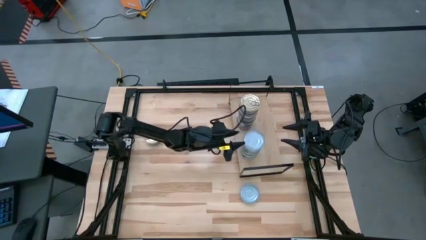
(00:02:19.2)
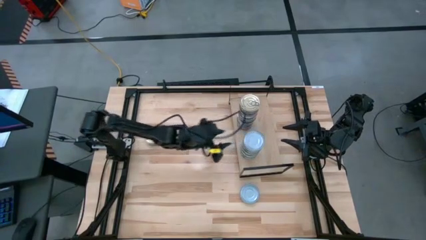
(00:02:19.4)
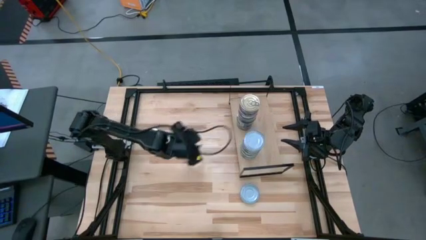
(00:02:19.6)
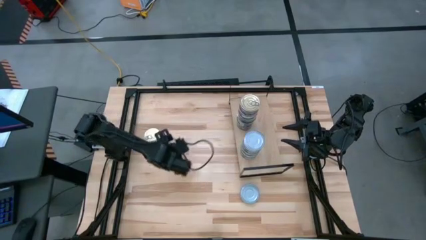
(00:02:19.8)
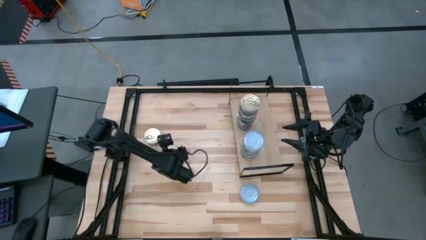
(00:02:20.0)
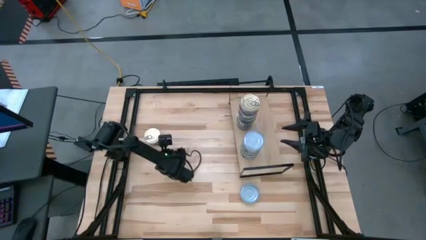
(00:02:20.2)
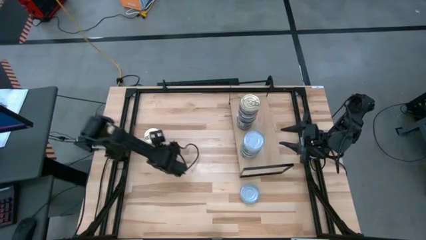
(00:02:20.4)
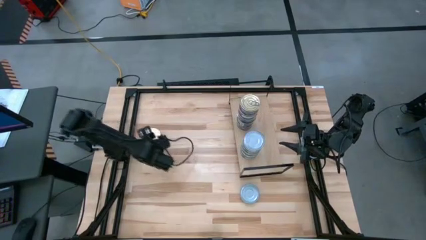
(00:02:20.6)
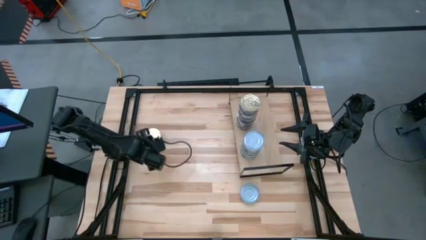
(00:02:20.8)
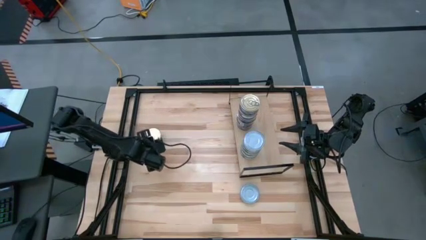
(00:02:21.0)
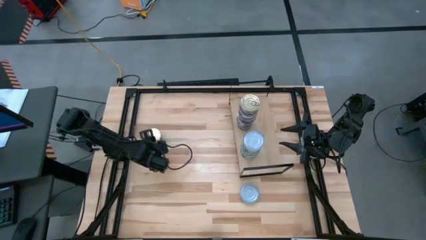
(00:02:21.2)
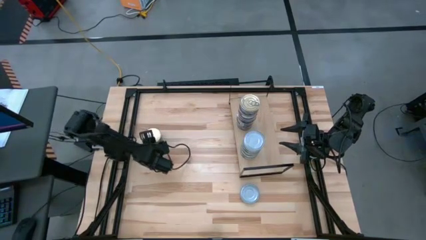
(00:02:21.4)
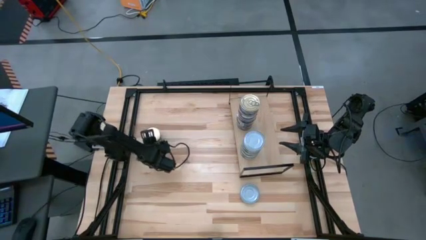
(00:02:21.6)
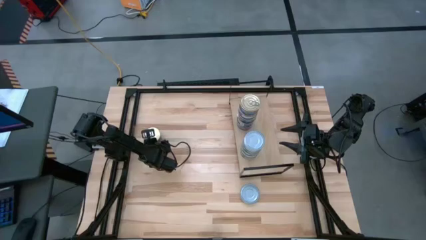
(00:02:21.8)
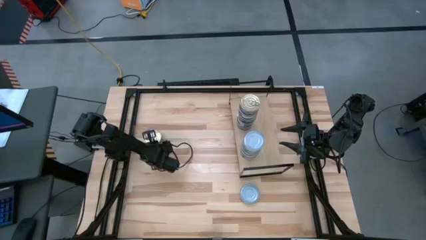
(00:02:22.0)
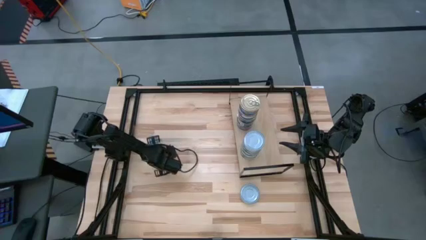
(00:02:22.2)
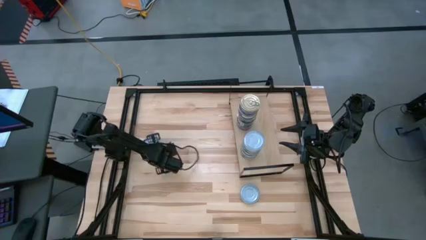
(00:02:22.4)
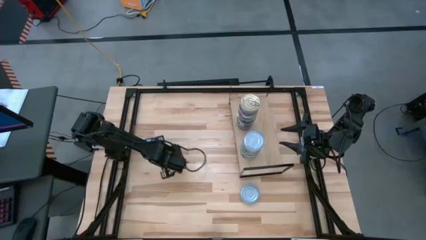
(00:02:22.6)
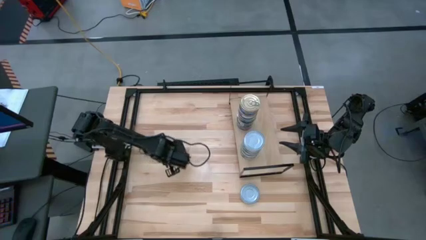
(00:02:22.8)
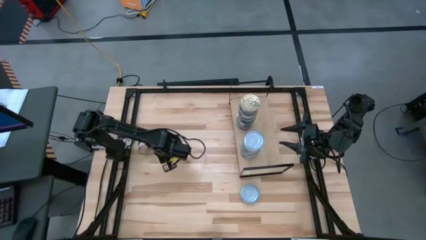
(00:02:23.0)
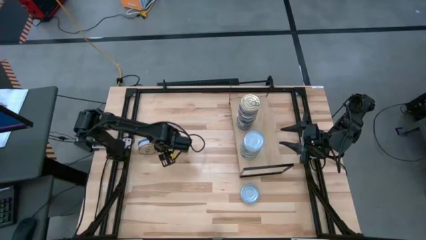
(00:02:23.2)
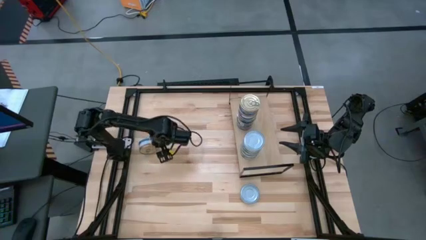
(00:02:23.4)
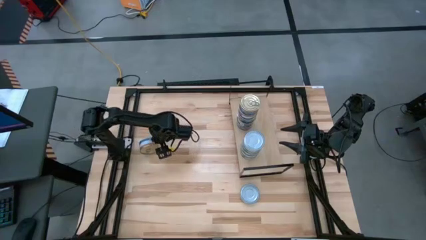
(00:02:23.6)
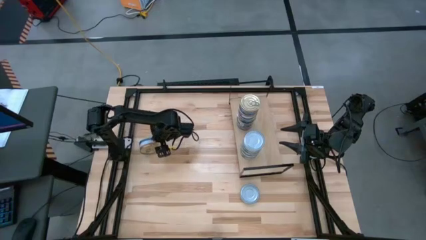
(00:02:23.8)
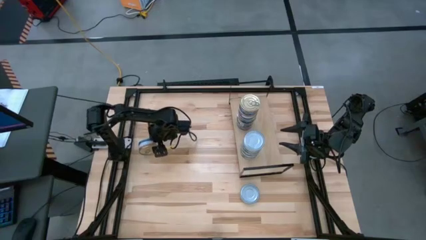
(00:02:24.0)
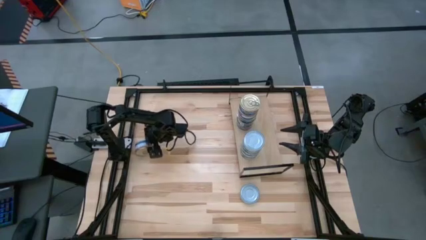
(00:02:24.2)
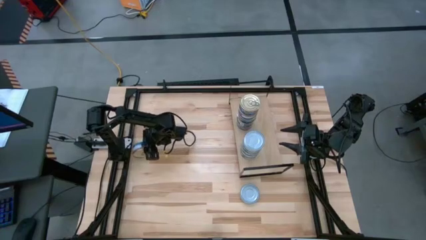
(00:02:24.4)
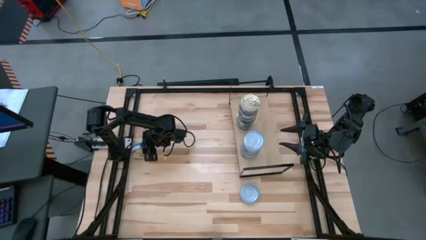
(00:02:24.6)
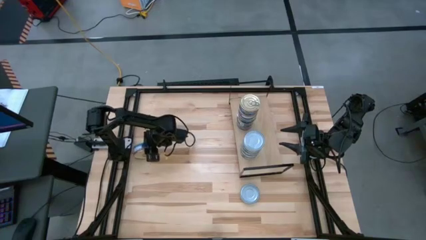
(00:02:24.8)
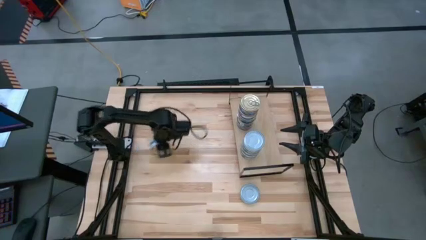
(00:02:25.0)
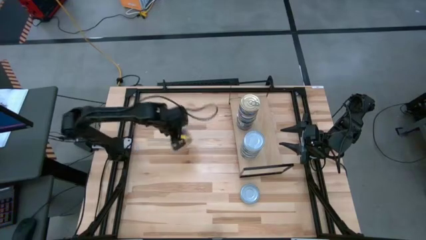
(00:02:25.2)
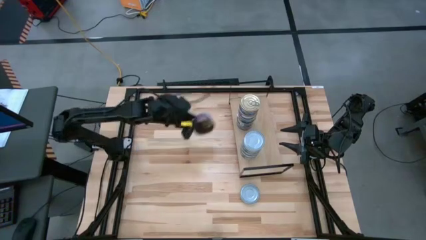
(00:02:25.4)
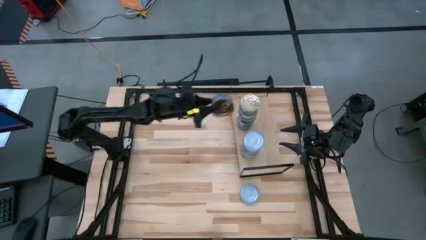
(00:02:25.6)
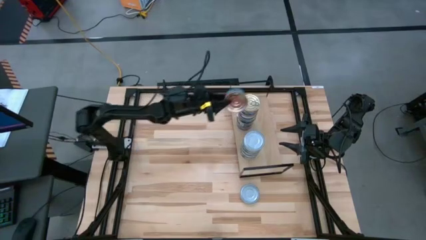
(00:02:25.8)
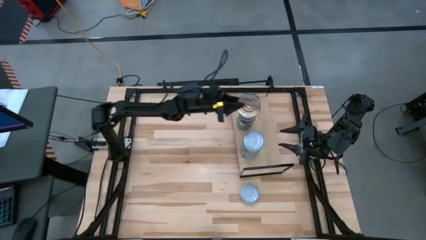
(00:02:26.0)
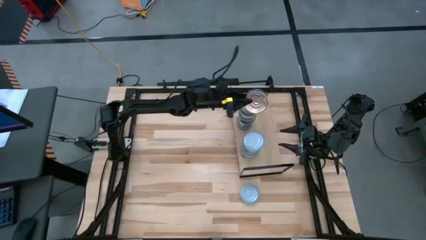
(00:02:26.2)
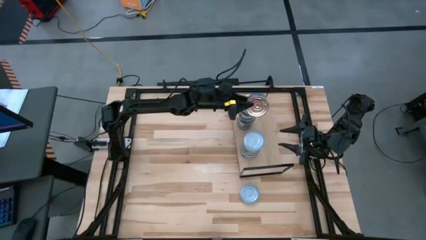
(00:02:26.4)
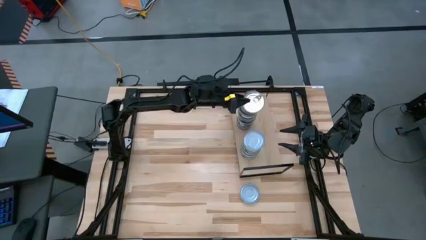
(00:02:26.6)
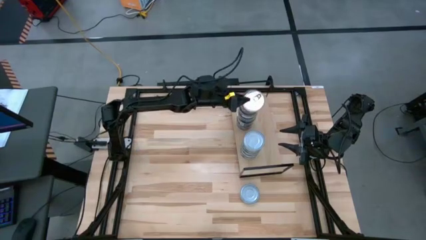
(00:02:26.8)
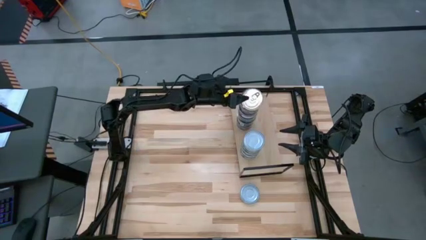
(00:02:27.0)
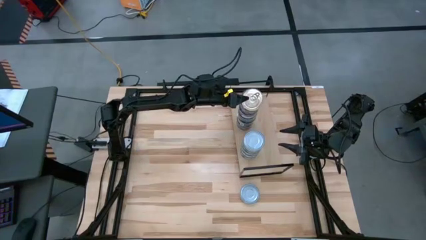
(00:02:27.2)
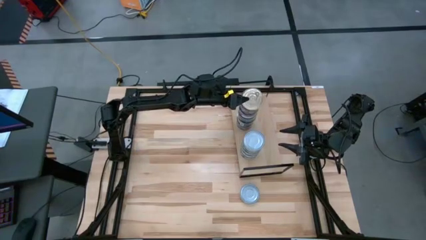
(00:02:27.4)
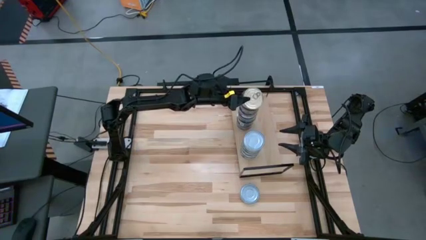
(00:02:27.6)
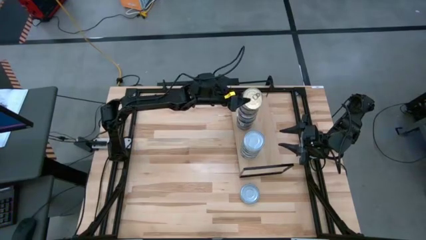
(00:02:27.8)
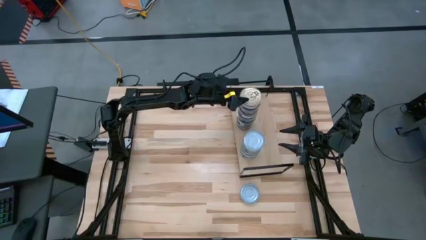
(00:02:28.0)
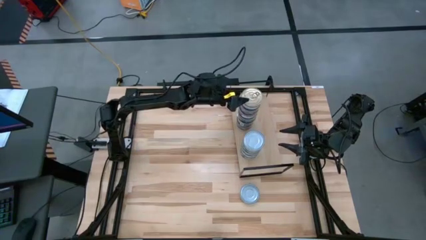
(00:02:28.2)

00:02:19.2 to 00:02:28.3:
Task: Stack canned seafood by type on shelf
Stack the blue-pink tuna can on top of the other blue-pink tuna can on the shelf

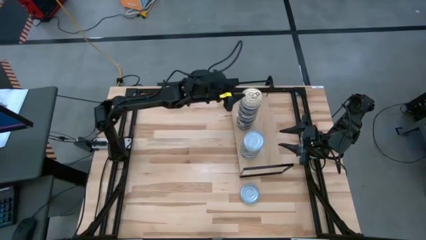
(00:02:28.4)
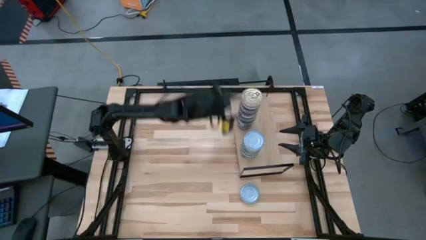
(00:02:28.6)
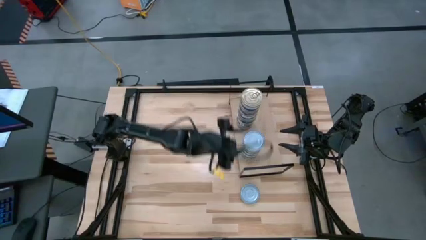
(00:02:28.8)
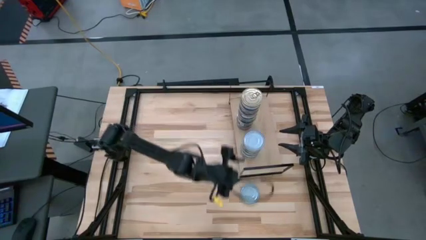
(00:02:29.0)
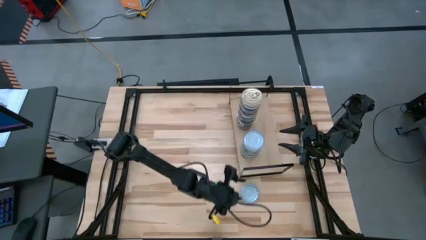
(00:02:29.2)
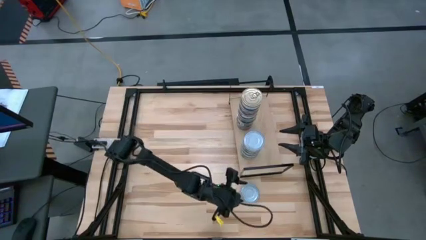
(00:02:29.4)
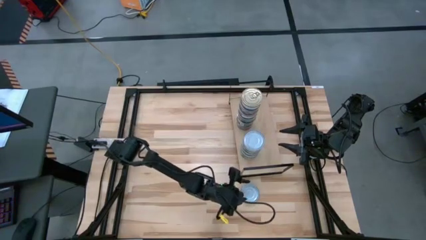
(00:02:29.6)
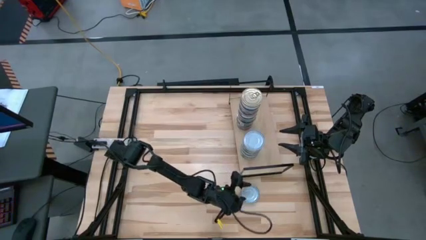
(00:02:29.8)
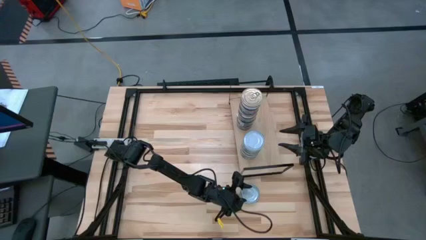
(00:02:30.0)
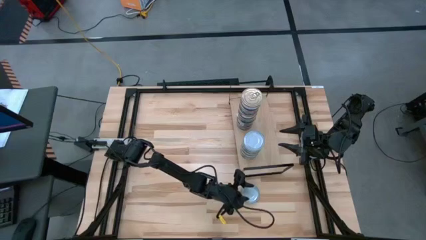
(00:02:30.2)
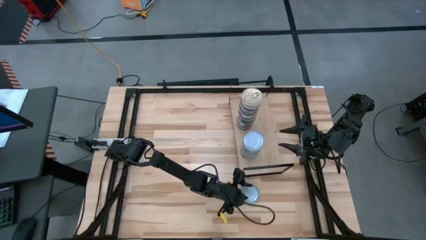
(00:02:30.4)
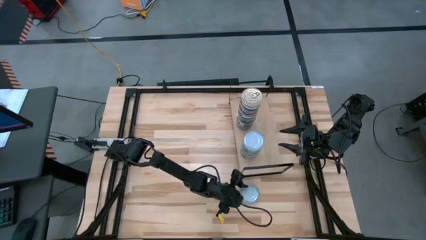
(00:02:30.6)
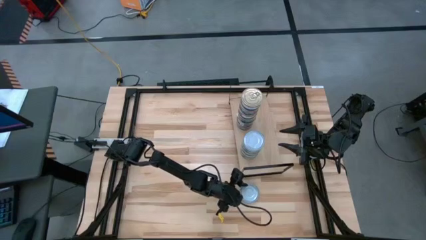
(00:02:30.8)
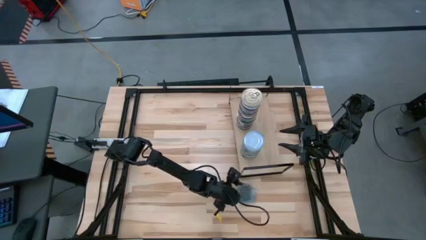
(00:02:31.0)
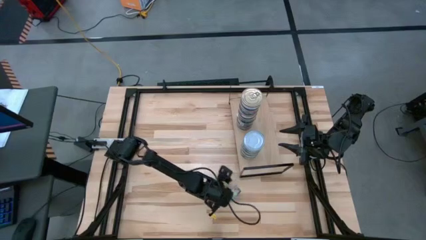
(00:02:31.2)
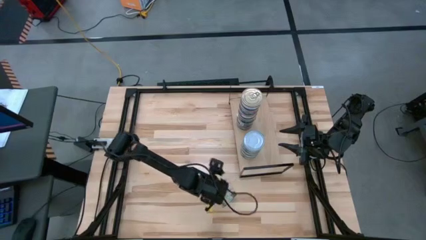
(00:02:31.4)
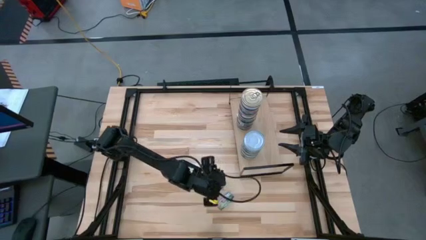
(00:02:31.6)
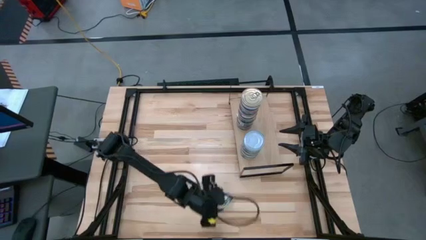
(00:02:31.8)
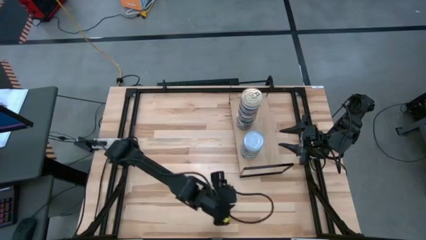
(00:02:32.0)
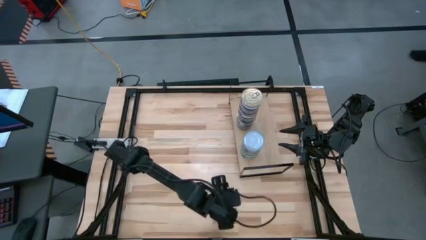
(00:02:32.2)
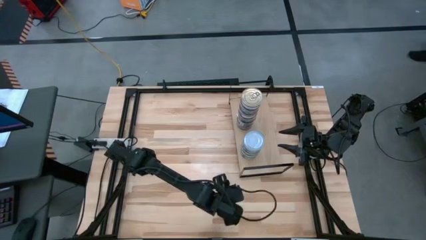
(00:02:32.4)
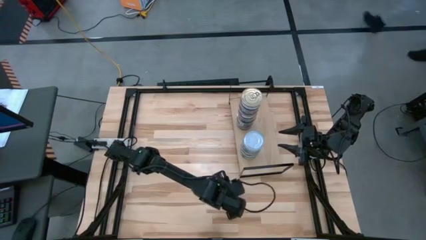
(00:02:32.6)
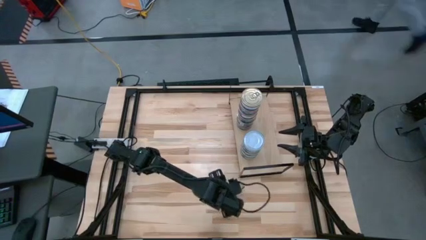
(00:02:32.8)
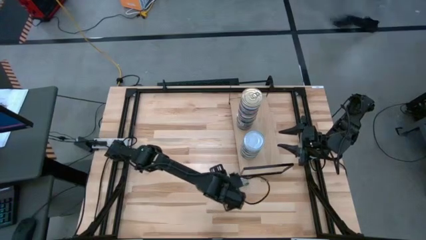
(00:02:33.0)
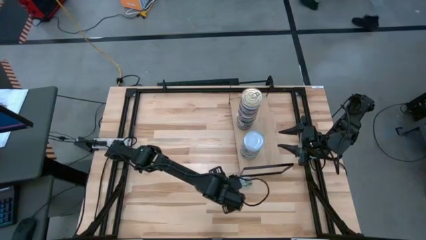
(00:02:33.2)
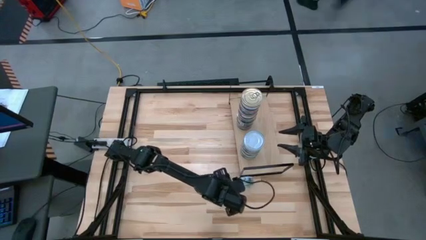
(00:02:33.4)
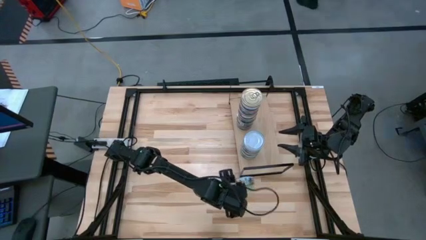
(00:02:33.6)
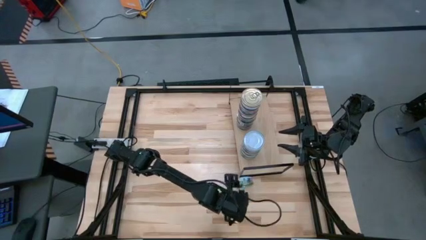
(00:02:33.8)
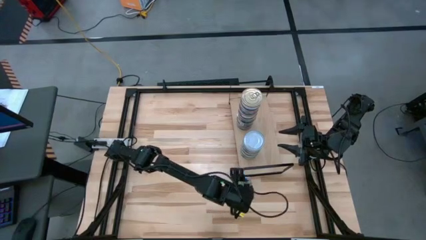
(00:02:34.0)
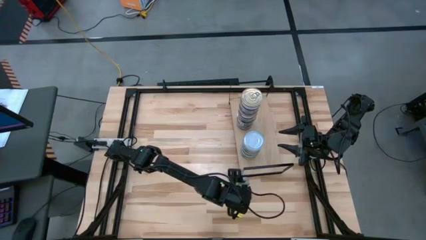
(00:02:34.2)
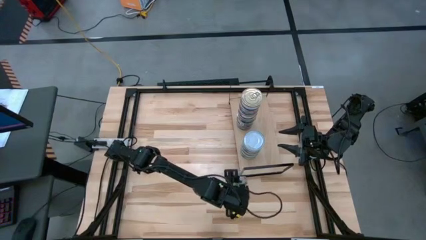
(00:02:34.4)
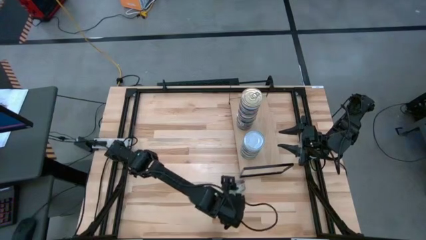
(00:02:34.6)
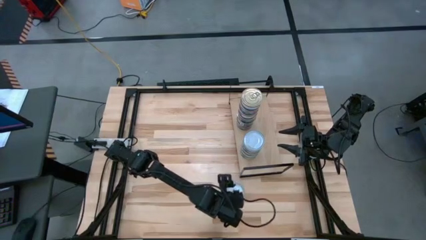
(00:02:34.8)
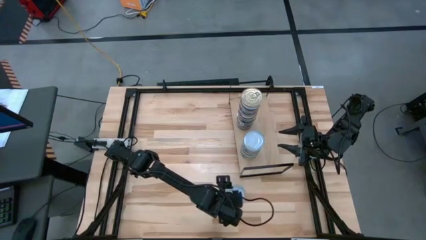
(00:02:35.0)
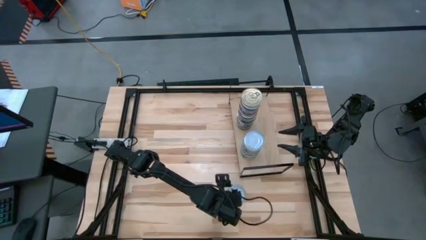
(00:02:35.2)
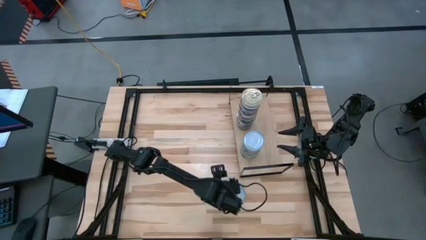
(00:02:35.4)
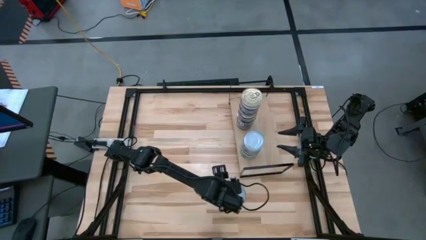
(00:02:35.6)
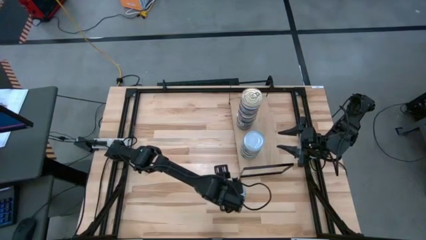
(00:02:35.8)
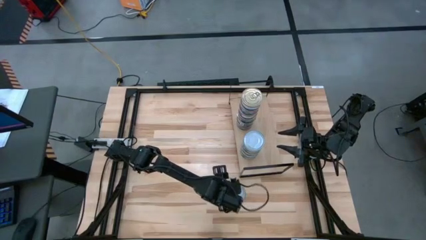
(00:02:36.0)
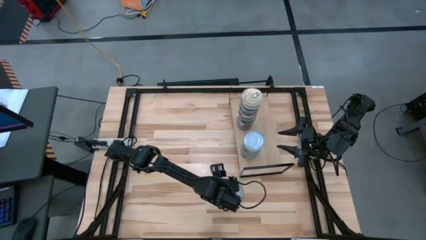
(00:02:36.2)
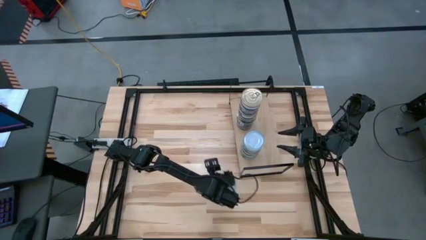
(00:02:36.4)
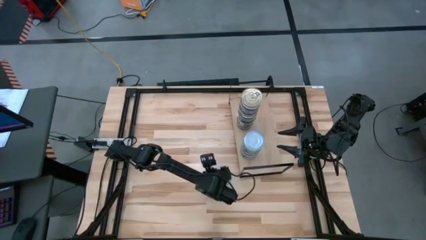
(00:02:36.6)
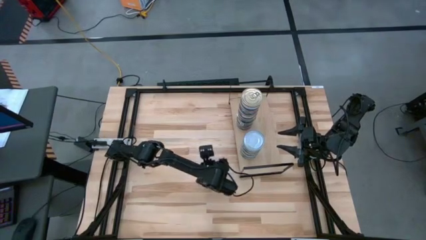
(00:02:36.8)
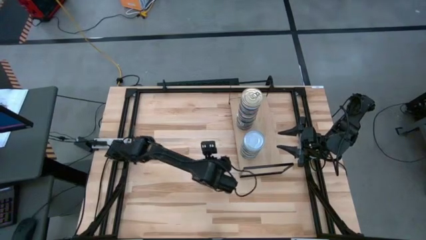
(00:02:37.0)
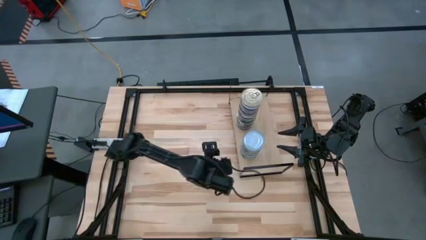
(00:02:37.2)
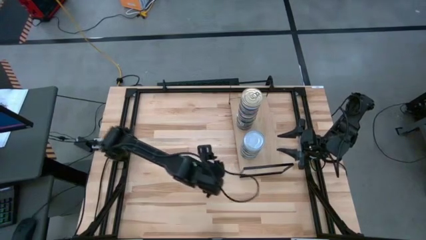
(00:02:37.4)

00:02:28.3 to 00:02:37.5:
Stack the green tuna can on top of the other green tuna can on the shelf
